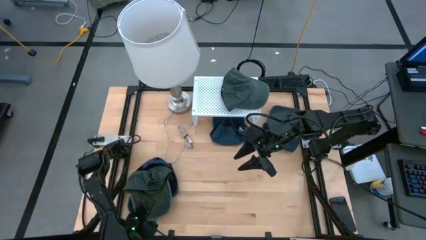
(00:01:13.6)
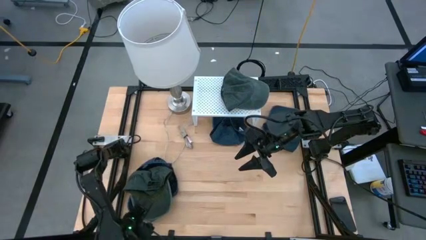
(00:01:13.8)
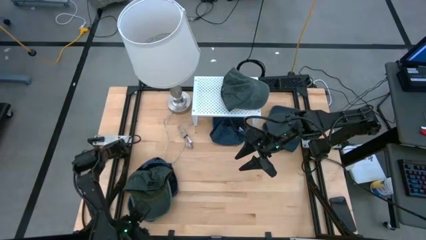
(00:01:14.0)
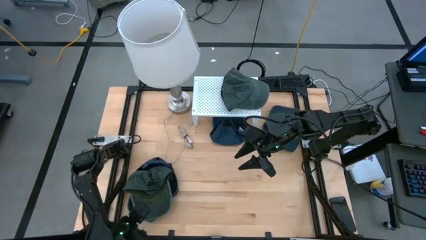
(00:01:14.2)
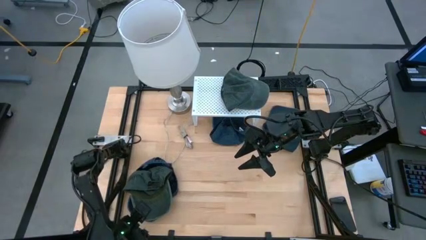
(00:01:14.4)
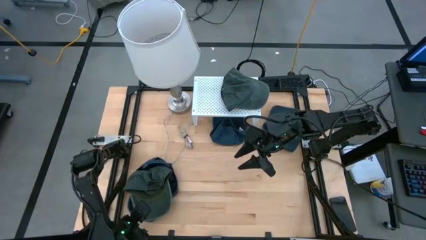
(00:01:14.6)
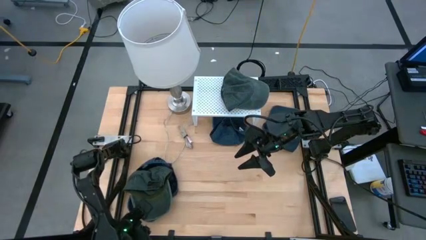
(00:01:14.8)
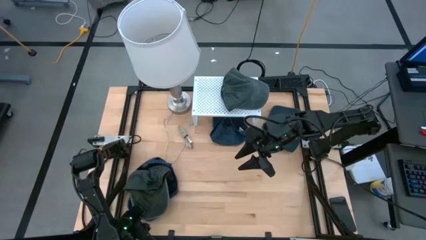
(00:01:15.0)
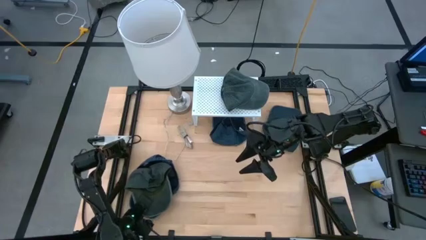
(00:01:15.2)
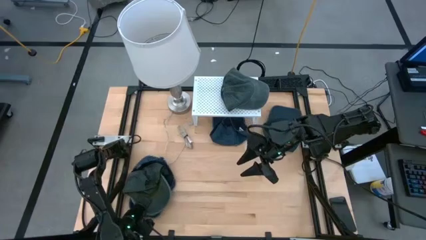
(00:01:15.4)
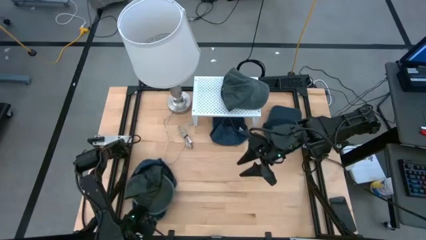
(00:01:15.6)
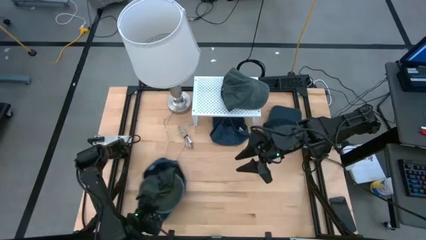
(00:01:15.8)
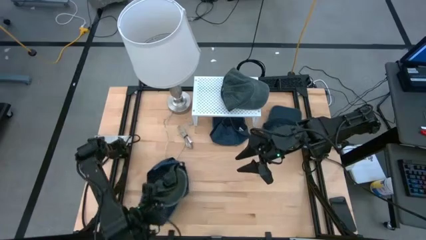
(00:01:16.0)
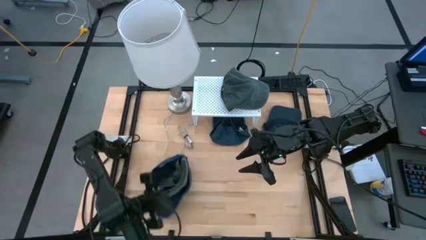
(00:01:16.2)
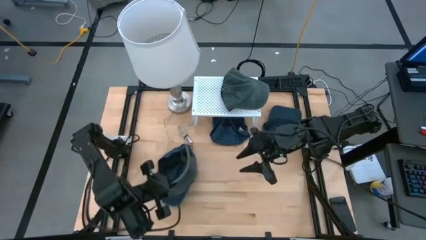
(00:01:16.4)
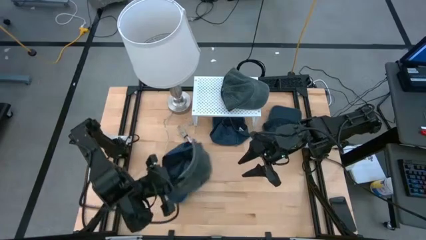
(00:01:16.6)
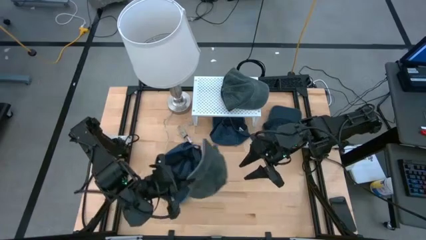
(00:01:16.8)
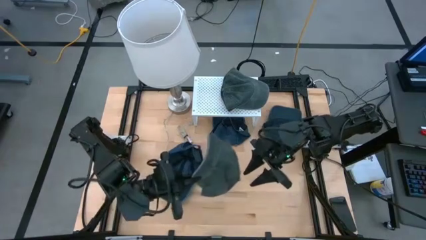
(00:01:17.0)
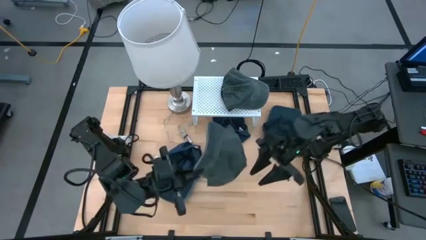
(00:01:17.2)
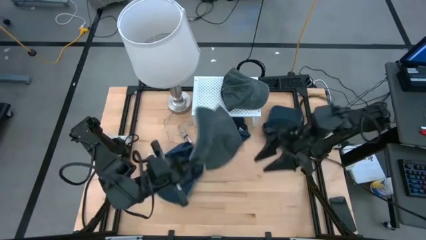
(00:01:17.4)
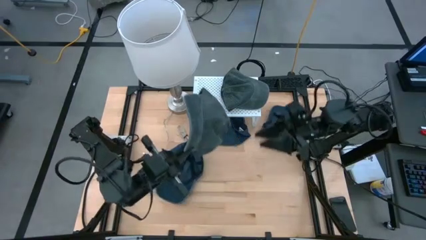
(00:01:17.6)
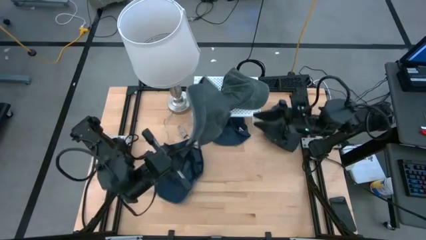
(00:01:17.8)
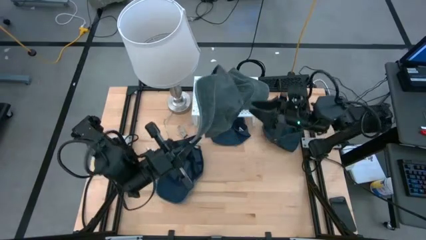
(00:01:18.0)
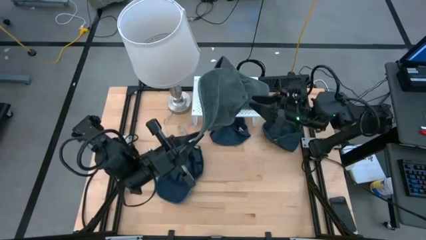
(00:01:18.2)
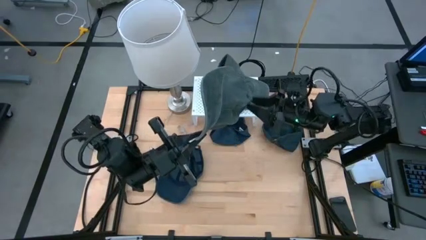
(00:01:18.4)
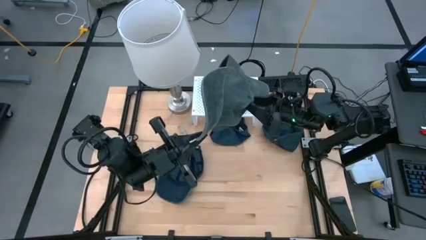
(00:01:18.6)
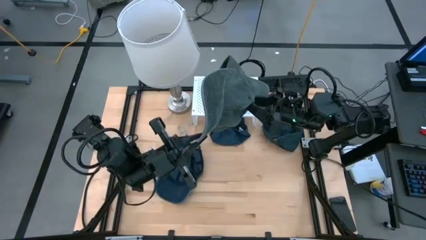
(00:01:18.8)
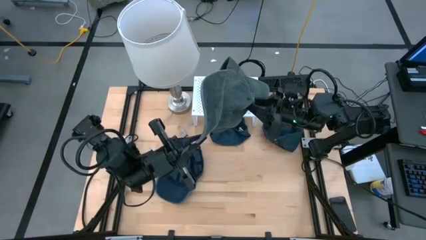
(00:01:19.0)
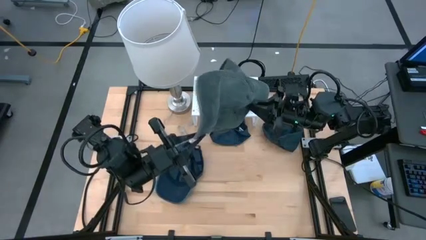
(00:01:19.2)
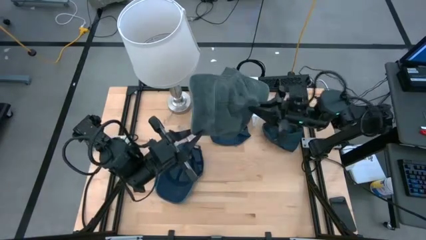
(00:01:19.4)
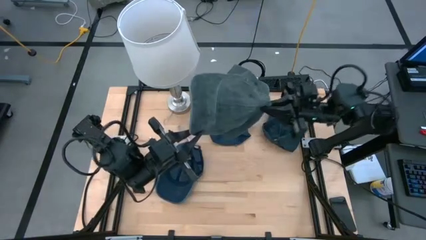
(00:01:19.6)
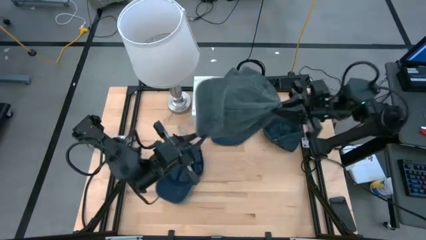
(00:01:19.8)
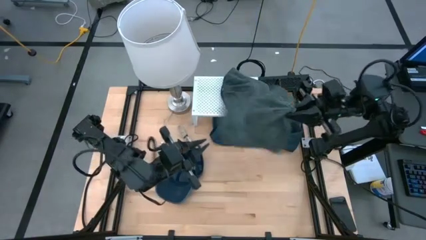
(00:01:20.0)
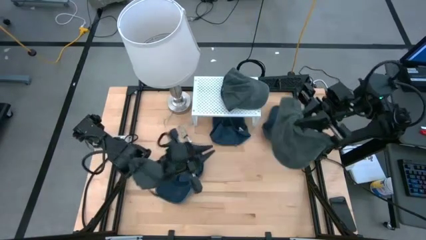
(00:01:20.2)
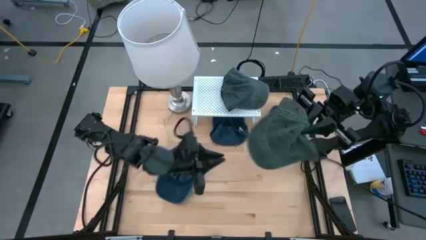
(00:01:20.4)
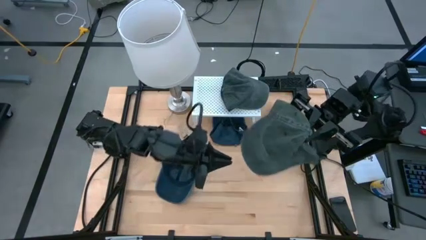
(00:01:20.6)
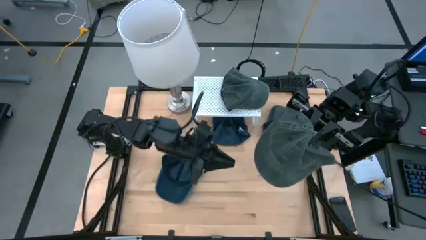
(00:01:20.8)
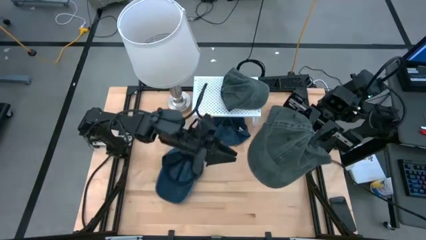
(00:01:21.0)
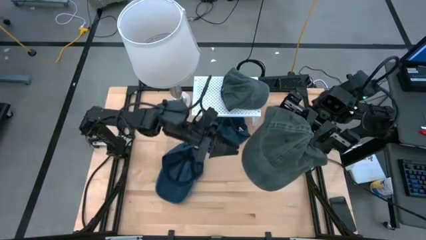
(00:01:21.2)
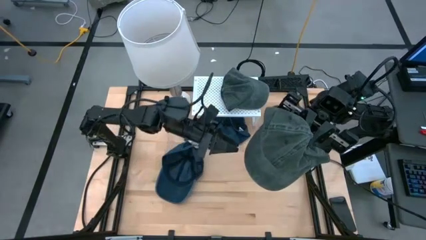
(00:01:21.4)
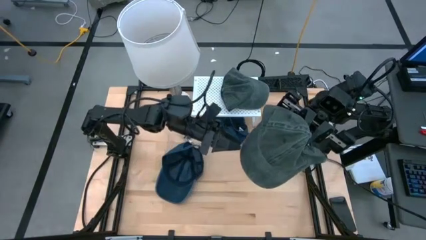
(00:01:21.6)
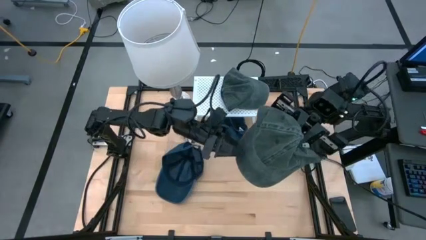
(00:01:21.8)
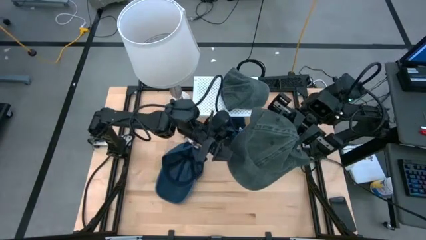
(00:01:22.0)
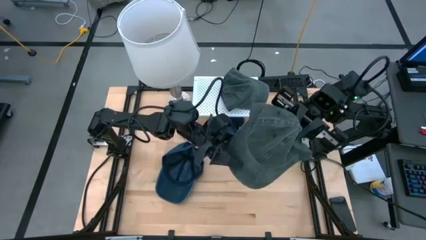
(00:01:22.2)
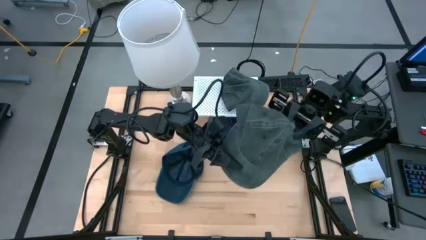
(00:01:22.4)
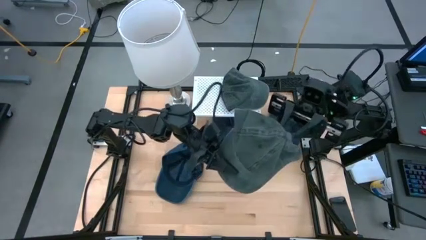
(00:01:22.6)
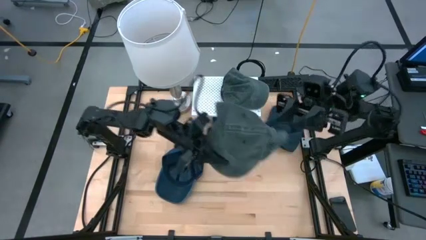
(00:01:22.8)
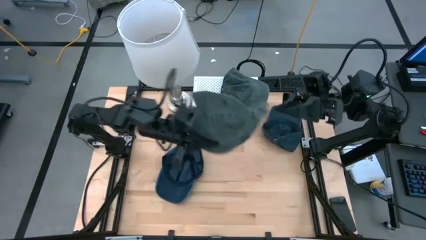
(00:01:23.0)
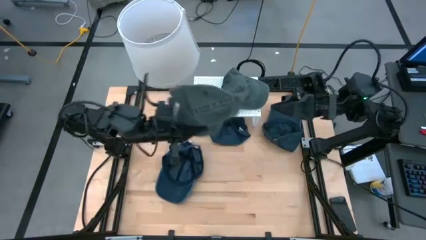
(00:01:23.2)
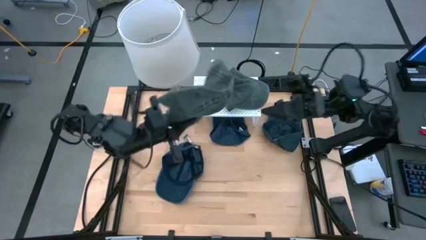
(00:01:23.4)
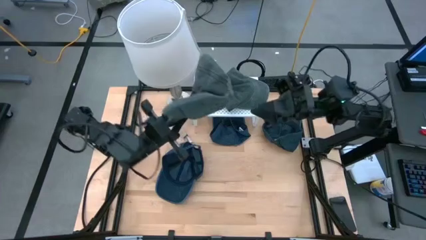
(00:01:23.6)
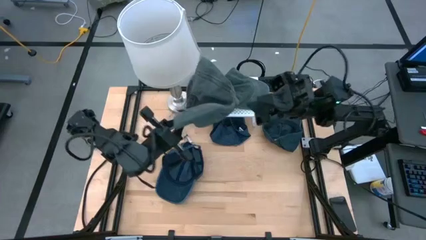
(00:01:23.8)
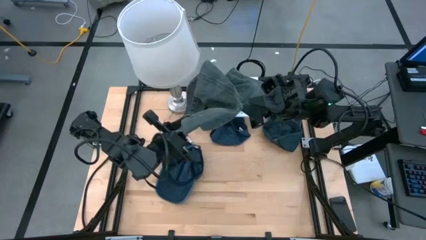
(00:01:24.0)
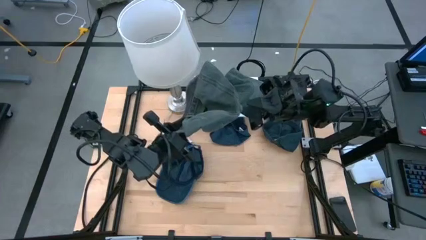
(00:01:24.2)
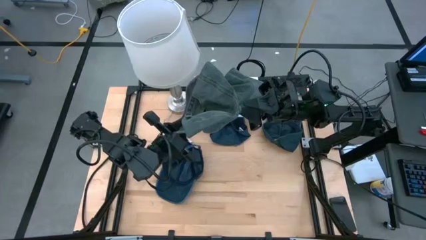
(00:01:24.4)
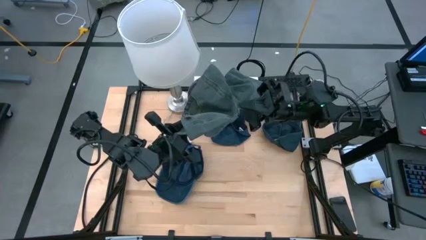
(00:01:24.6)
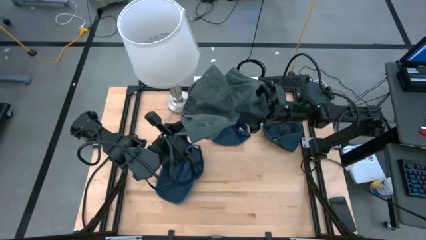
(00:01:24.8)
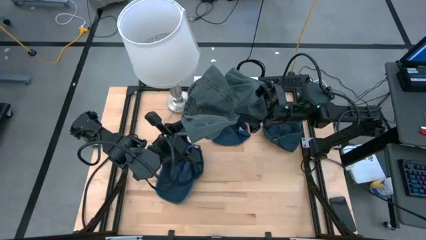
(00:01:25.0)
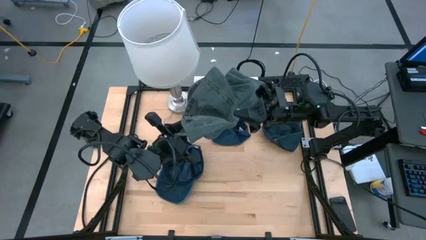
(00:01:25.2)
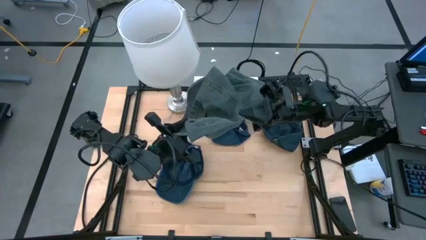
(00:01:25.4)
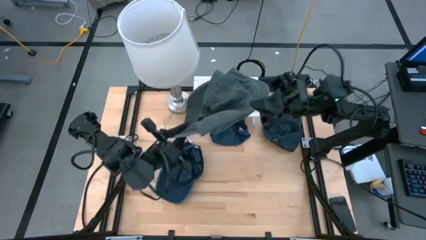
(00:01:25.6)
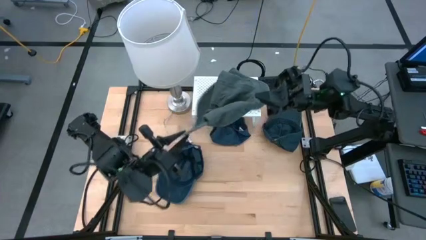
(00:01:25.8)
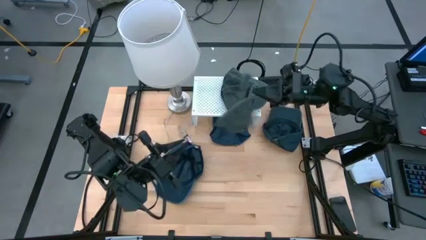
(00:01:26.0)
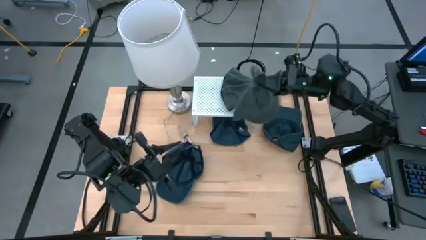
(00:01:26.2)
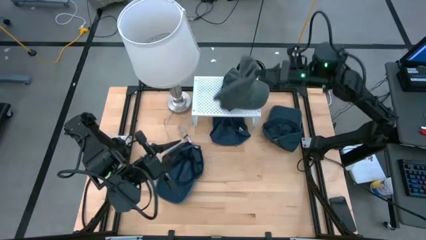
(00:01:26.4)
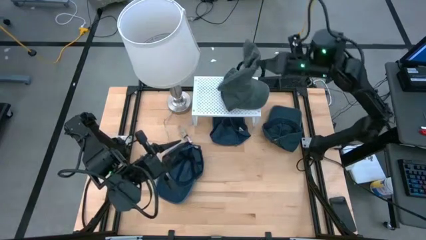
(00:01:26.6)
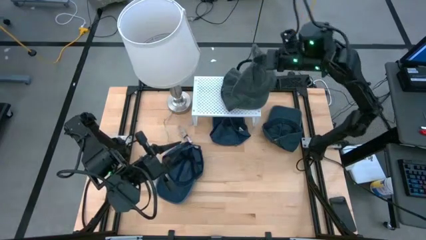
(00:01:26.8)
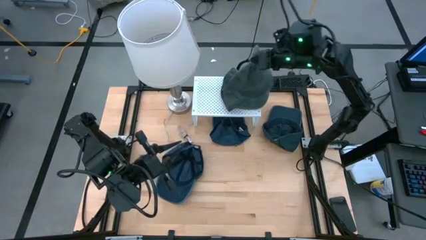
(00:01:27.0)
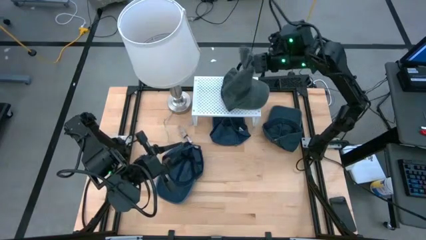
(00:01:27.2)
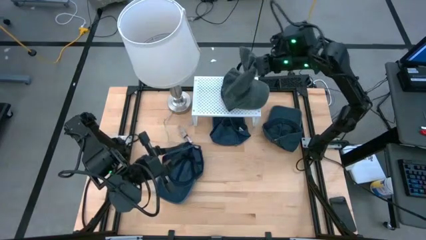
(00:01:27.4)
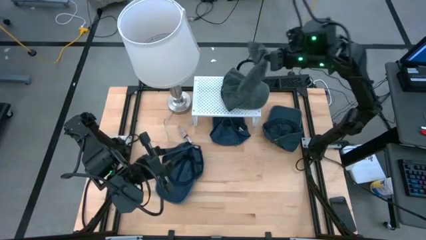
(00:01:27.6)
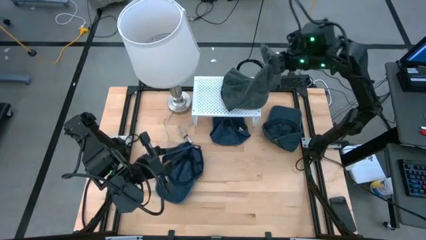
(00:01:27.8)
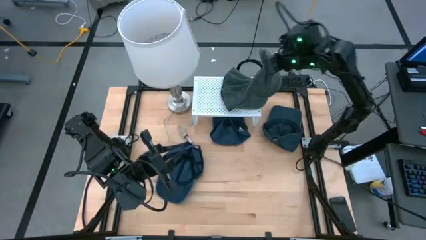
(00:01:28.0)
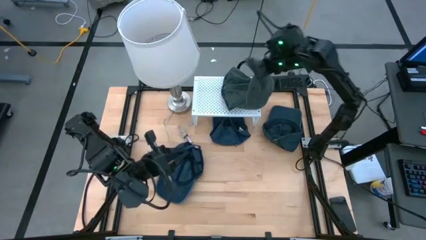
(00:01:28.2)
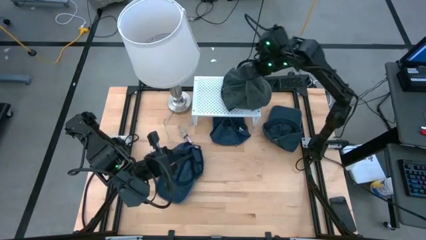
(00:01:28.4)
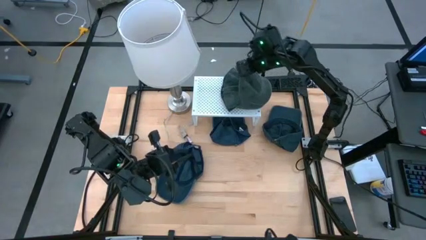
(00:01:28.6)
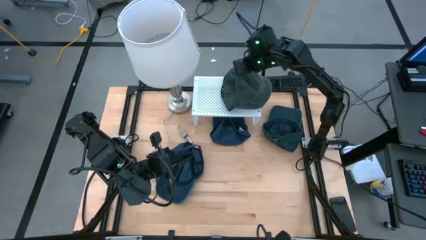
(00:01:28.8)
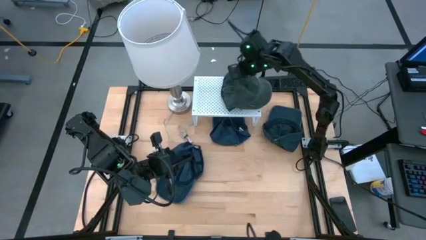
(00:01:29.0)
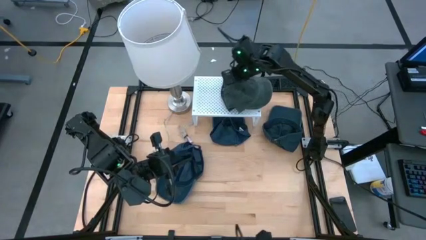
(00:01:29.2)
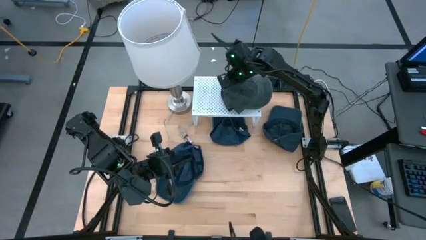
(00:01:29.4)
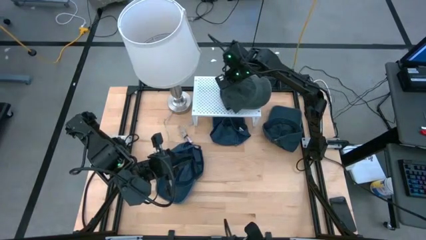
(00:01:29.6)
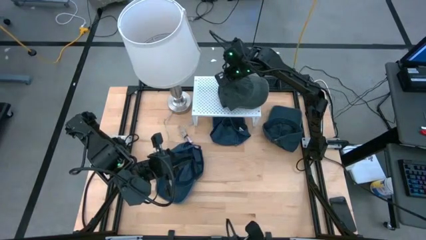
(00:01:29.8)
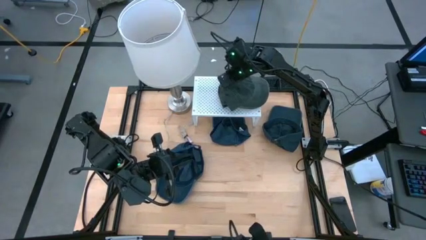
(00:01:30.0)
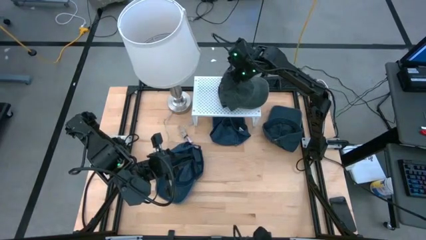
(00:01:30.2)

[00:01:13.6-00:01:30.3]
Task: Pick & Place hat
Stack the gray cap on the gray caps on the shelf
